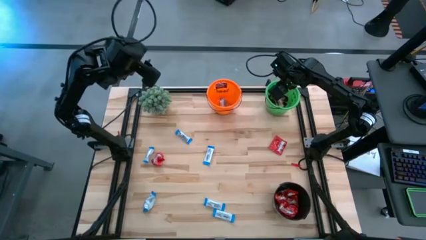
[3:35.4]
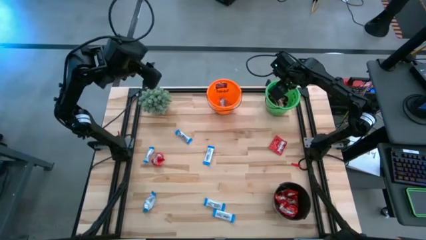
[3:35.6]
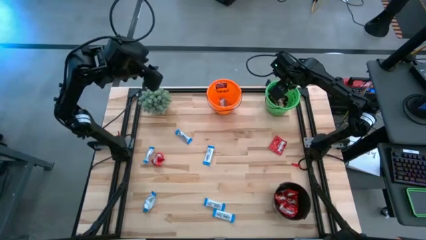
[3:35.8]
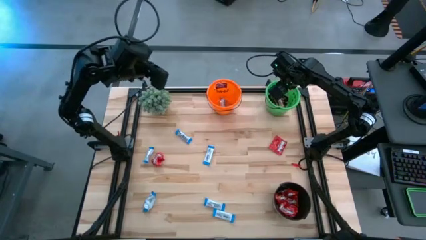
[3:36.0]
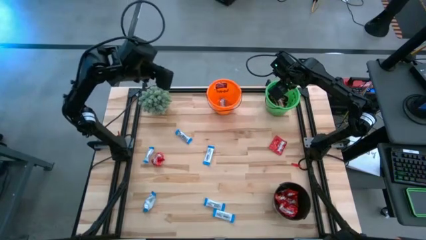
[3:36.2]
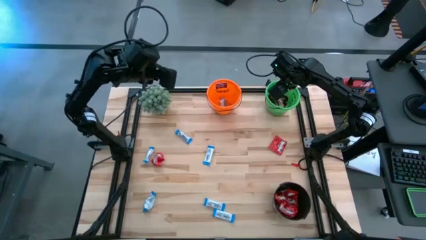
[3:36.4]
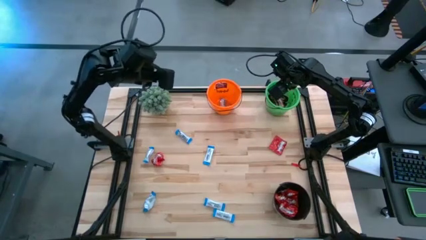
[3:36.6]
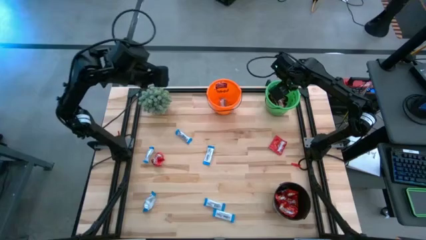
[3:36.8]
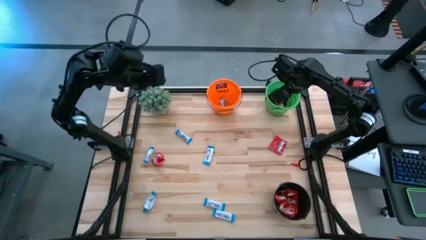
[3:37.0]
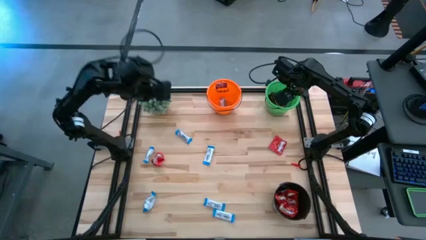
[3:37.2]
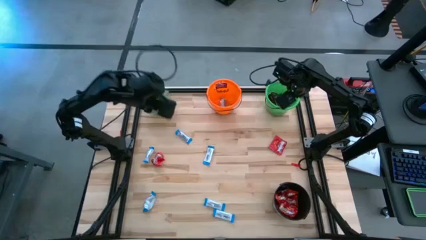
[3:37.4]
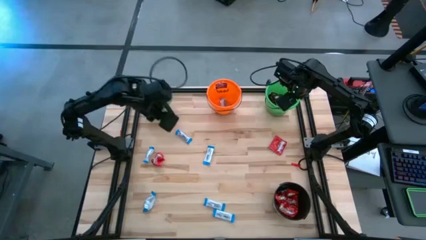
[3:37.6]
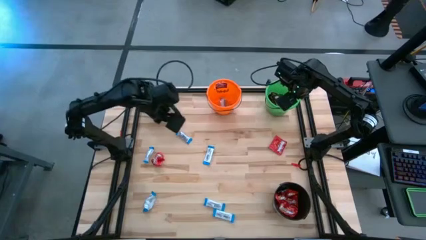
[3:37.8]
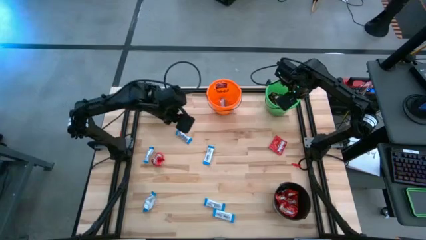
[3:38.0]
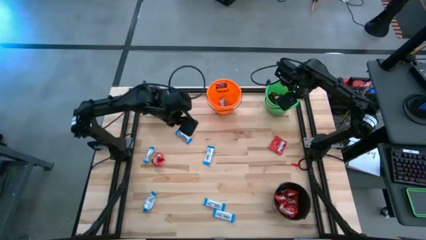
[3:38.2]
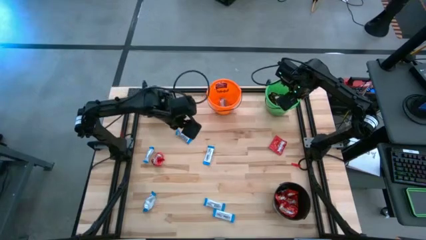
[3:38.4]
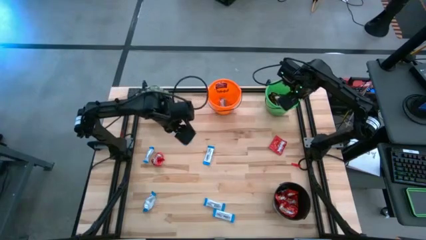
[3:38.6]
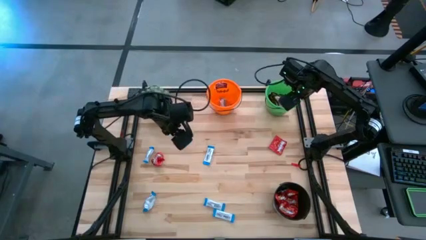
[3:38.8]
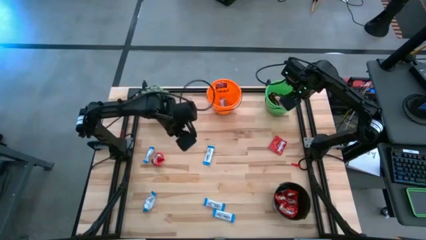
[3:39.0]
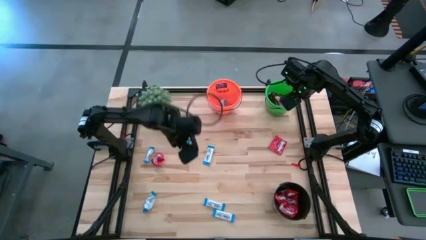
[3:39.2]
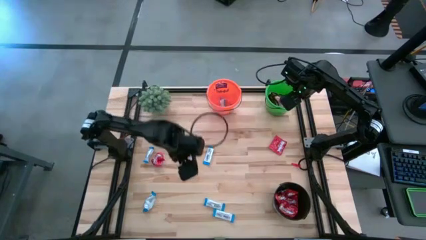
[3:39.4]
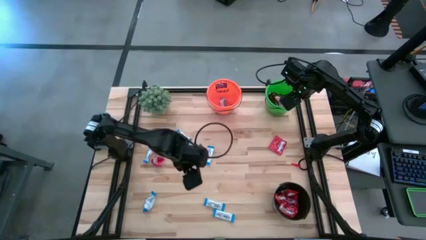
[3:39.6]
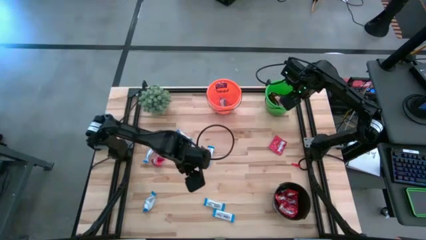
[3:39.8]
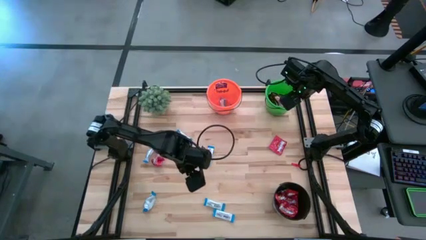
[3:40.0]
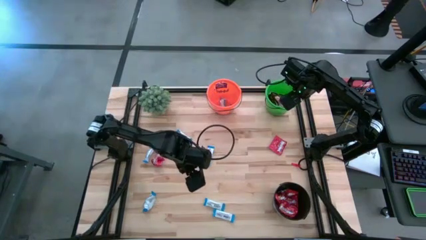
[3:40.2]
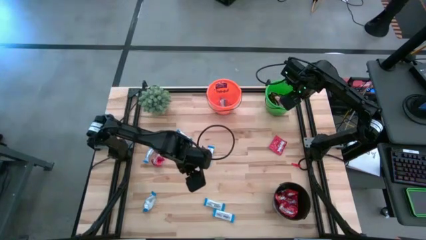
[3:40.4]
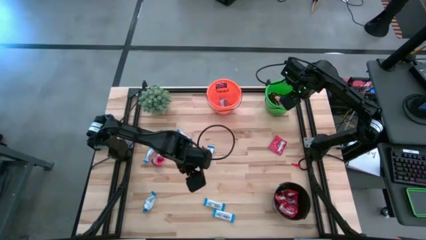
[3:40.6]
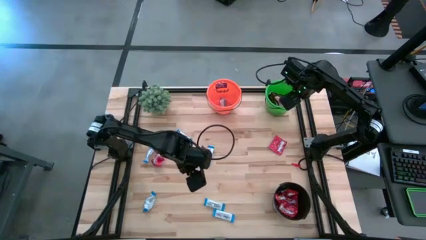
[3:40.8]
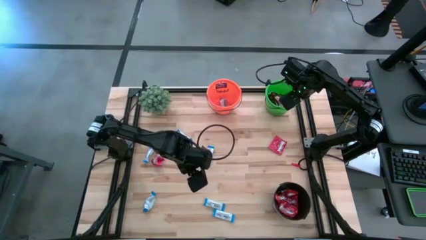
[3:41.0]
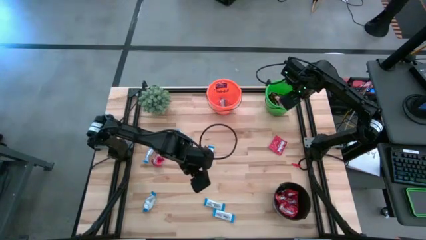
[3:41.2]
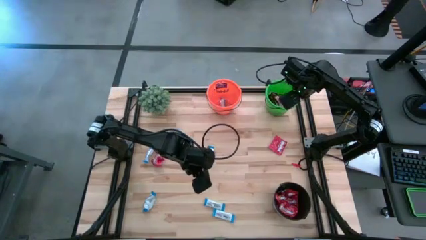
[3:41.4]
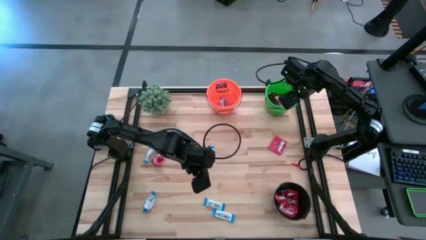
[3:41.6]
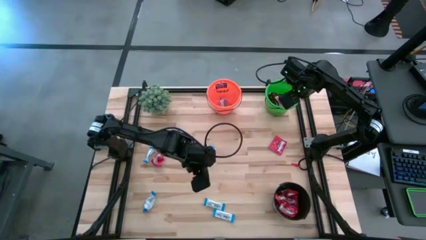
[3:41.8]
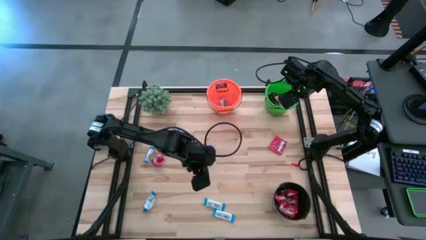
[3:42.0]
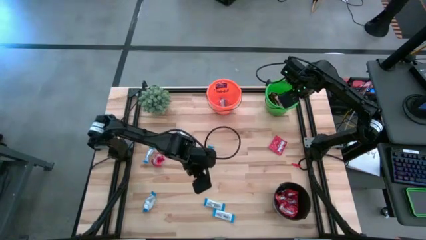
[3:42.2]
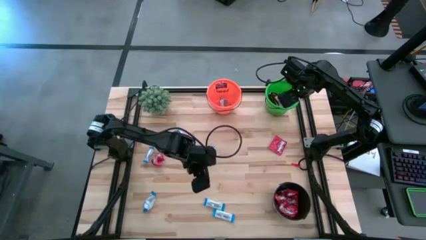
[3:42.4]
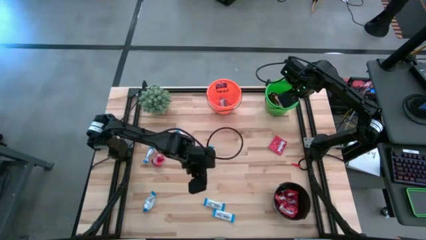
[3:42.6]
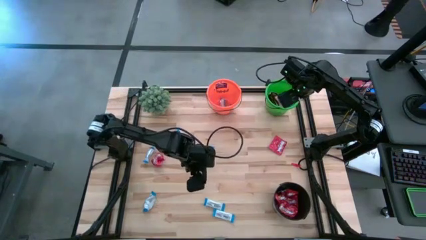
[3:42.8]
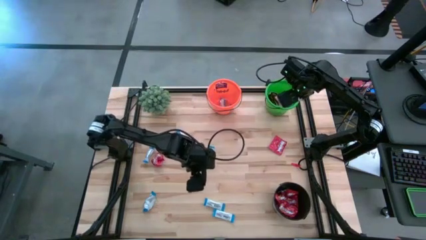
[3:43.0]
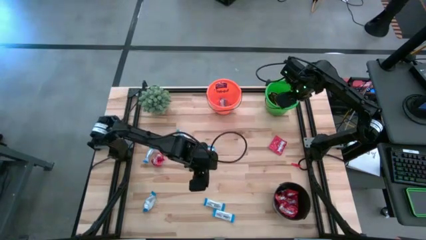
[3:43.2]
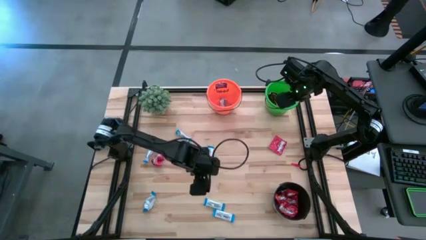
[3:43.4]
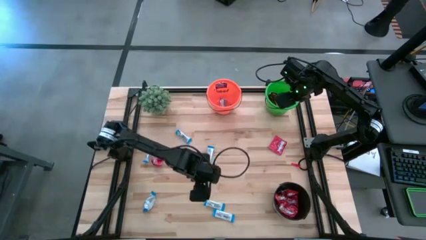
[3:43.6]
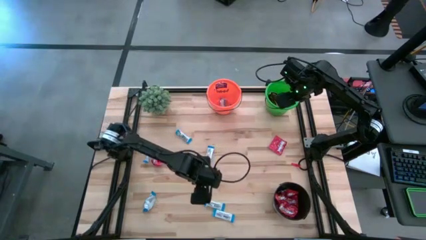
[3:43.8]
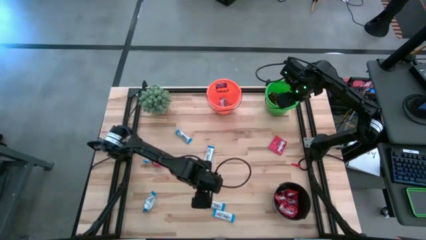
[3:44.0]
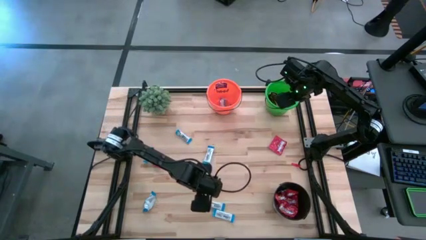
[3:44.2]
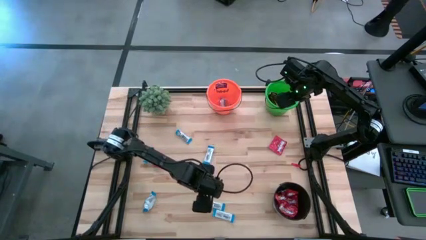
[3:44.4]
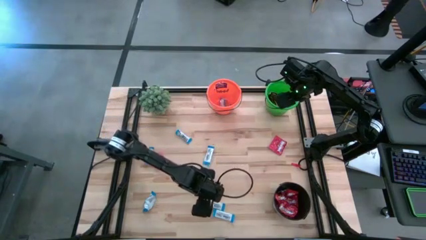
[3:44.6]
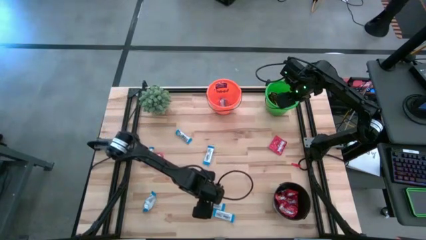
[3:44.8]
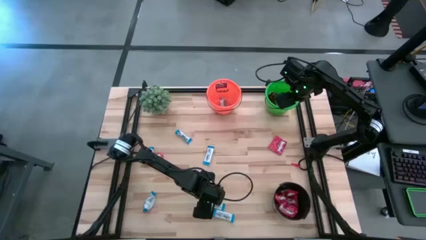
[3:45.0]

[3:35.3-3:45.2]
Task: Organize candy in baskets
Put the white chocolate into the orange bucket

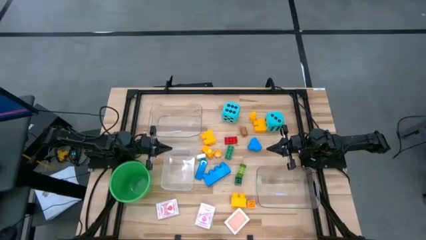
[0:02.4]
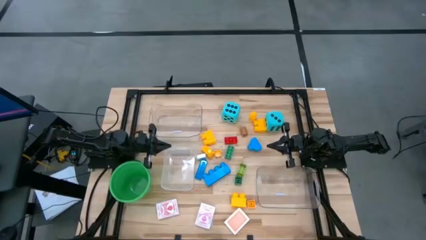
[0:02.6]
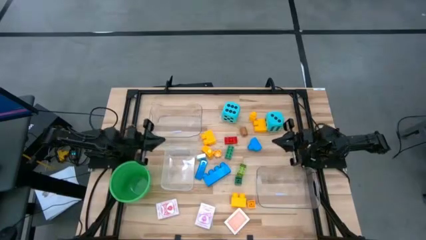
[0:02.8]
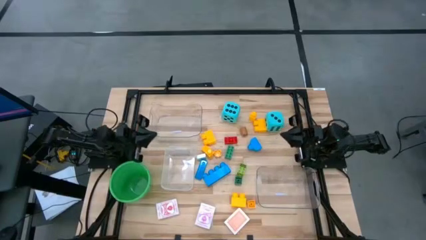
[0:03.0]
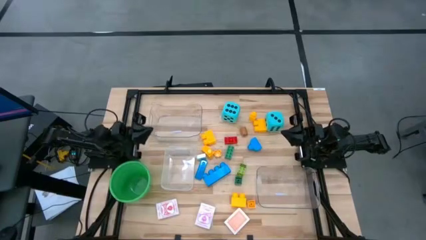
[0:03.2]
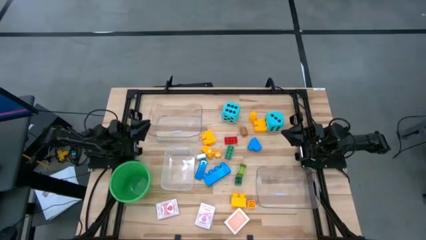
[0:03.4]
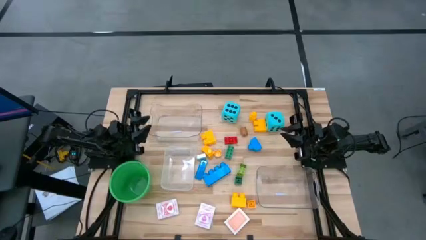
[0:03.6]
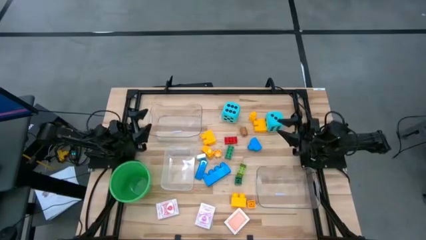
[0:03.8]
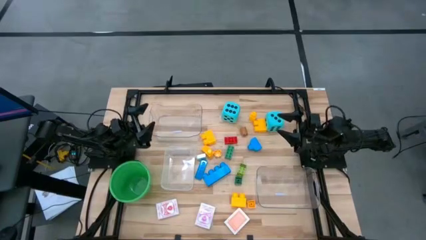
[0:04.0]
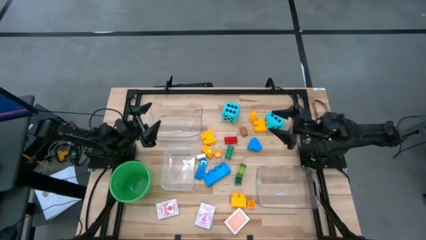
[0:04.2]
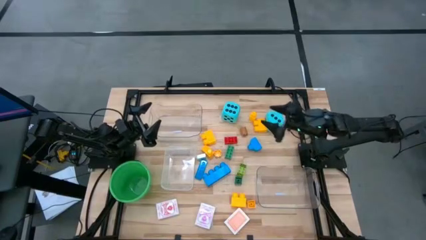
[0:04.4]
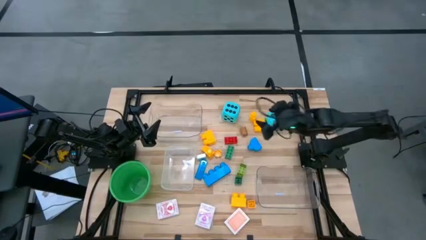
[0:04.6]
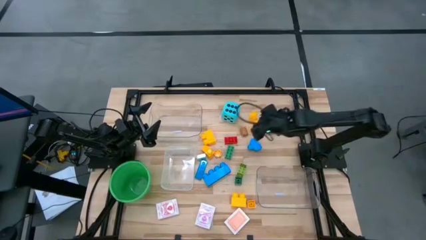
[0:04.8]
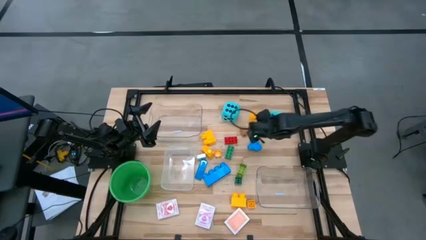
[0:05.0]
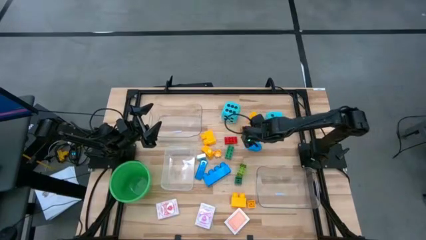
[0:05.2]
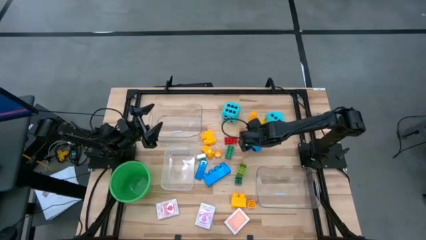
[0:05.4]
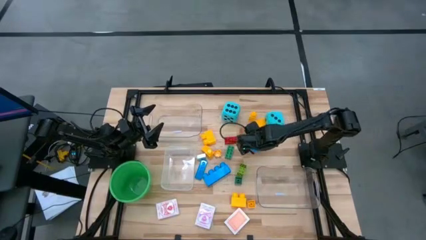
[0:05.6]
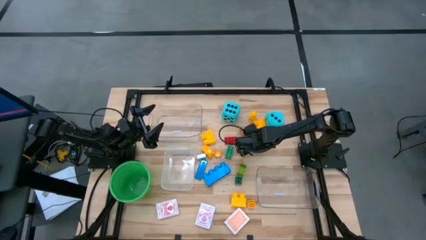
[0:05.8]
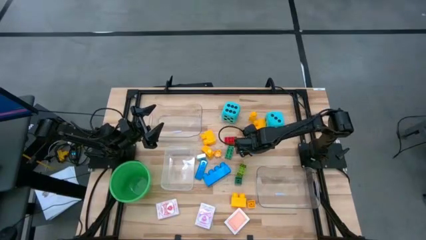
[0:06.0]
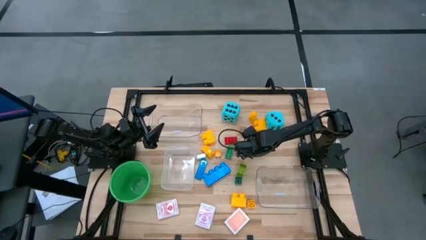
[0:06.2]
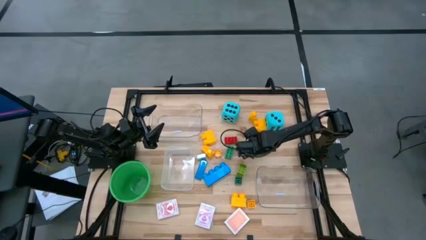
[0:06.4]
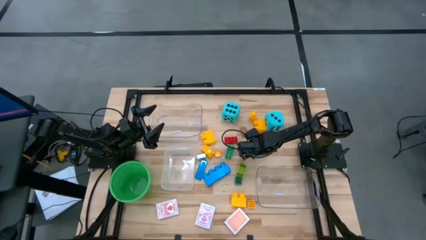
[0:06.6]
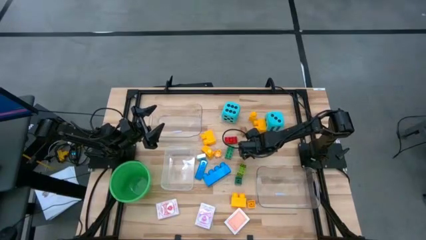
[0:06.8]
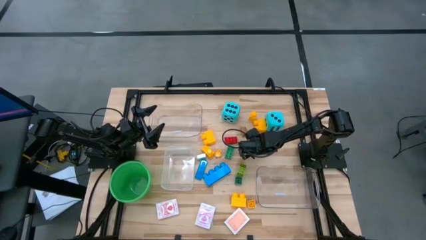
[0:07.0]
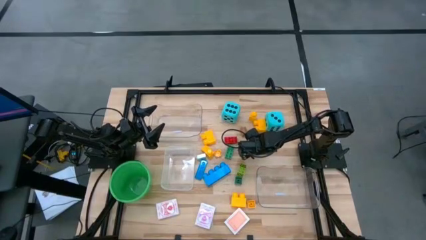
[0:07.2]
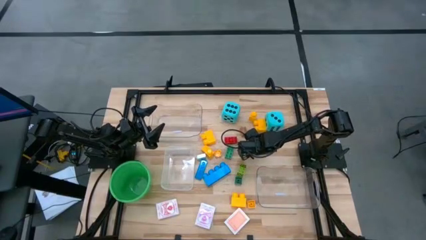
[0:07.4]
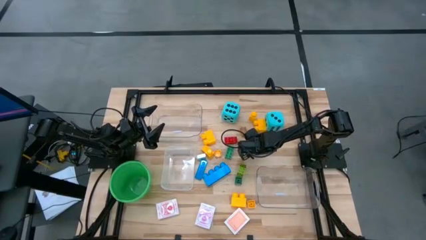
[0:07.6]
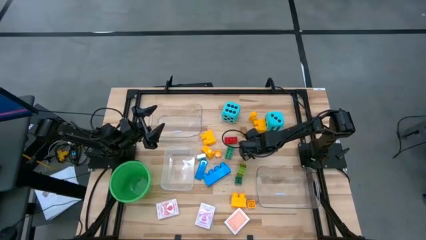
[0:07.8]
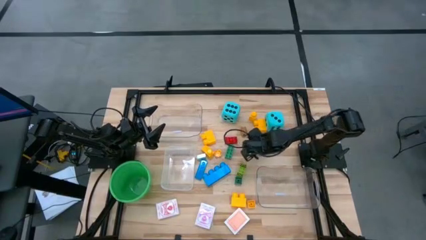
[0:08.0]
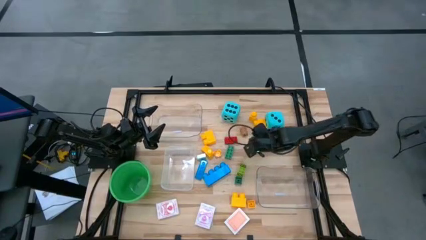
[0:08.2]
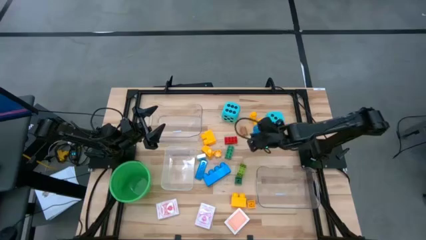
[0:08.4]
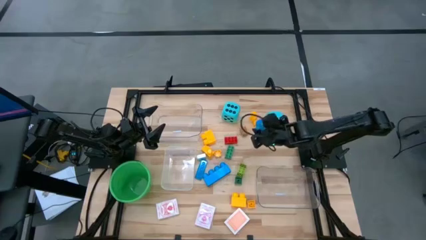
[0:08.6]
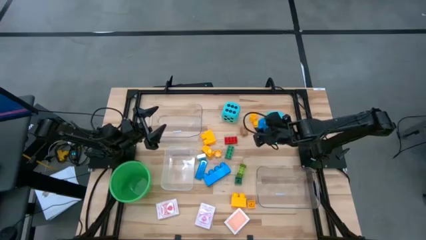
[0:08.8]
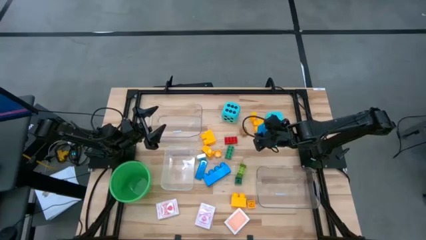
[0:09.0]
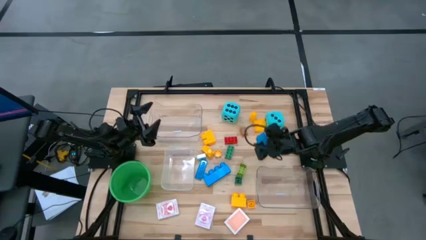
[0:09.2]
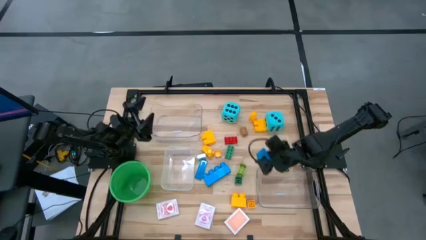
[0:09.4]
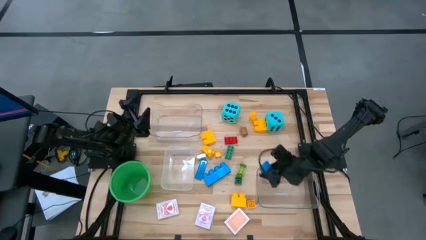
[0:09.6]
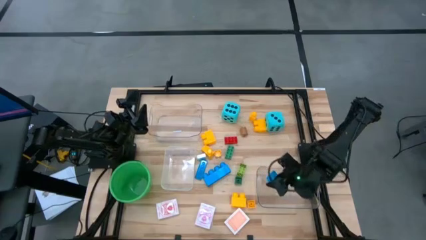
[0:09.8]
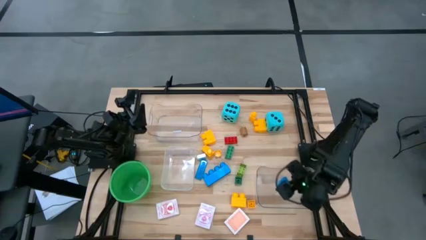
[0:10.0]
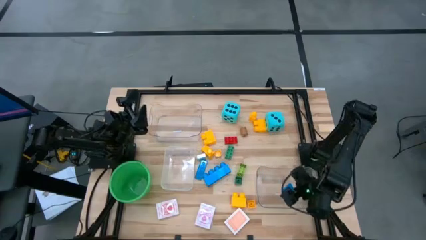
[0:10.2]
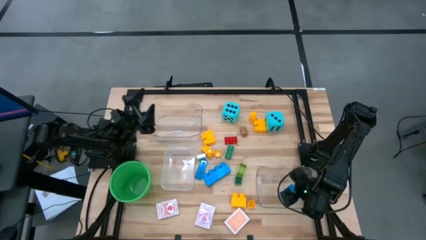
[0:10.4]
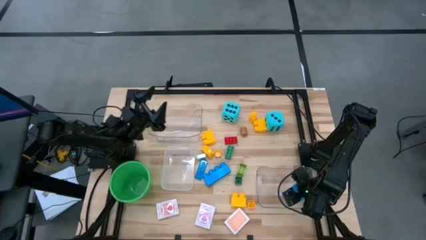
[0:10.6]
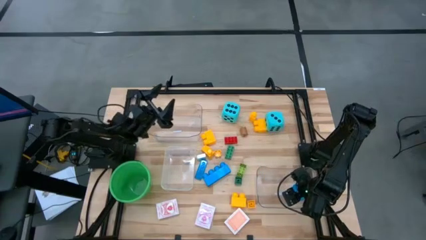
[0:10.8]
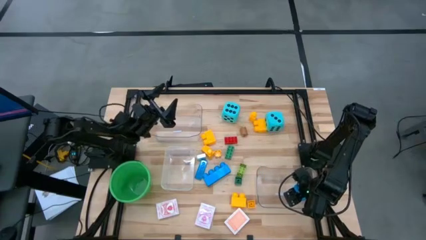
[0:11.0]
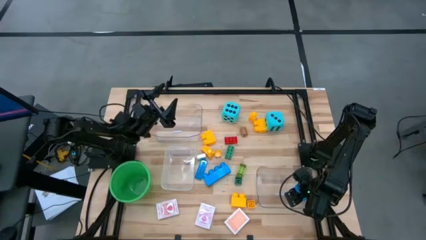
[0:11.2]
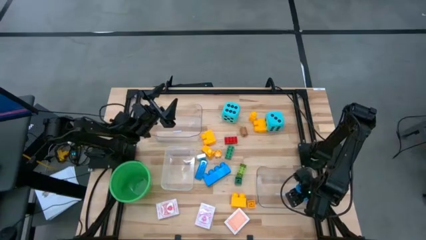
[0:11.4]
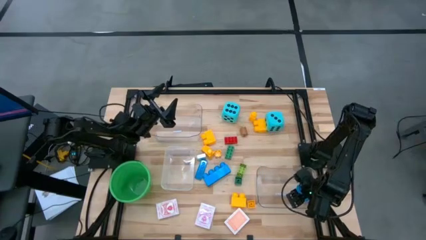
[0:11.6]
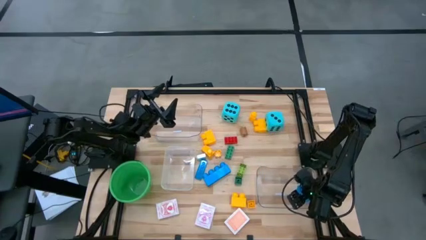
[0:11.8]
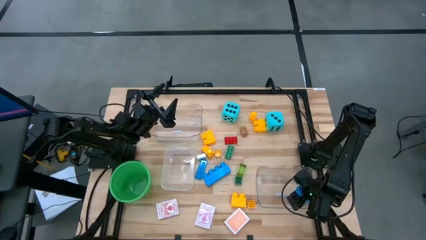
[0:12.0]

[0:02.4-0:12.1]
Task: Pick & Place Toys
Put the blue game piece into the bottom right transparent bin
